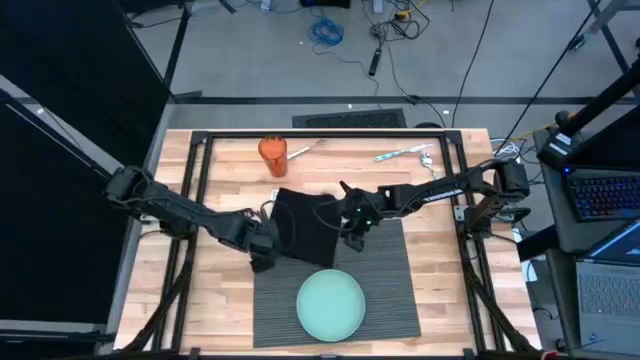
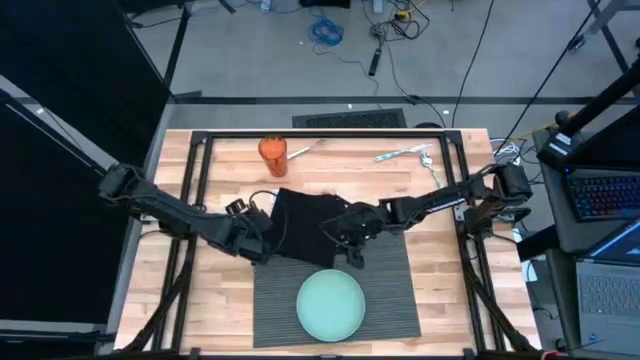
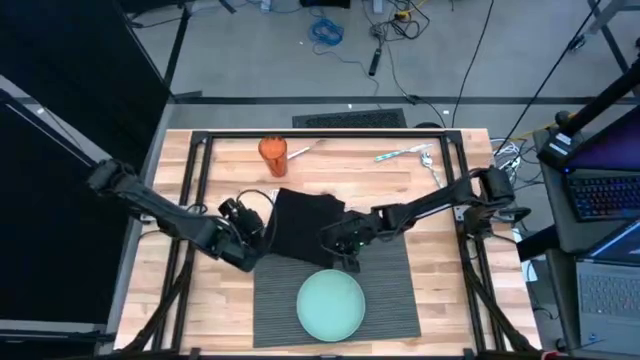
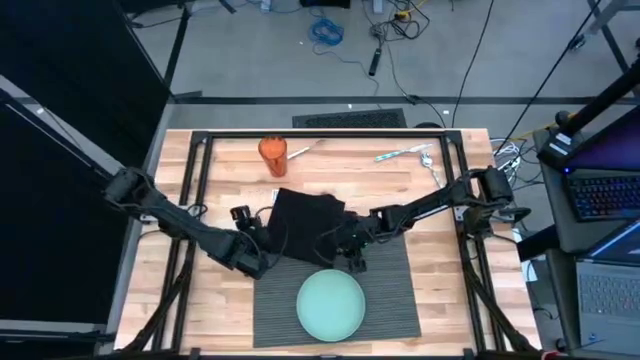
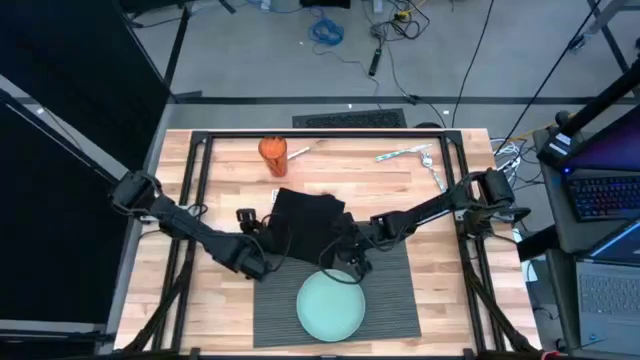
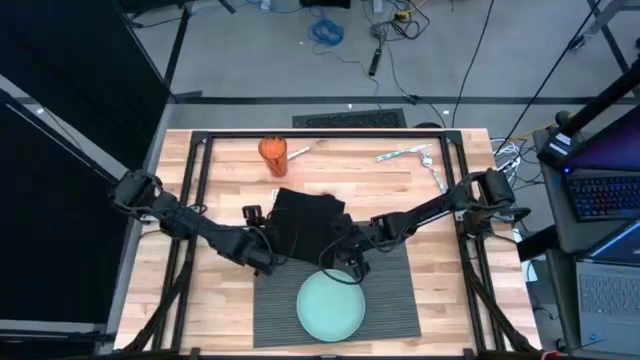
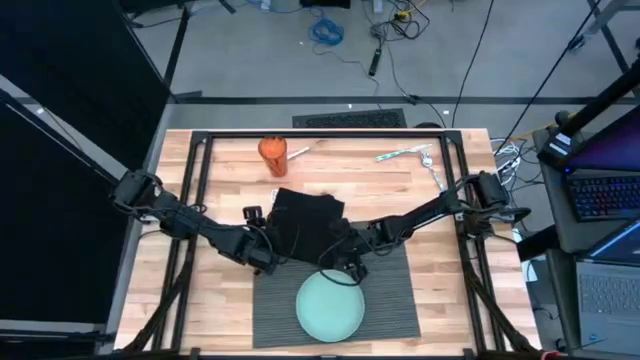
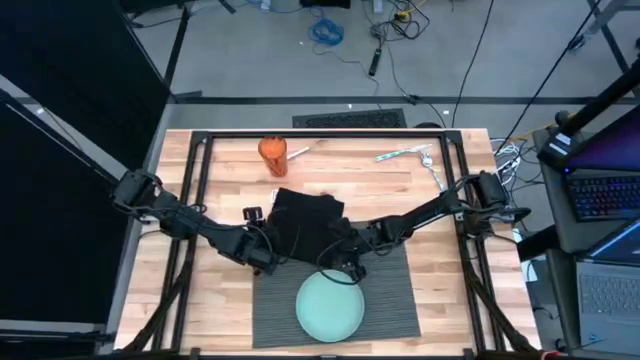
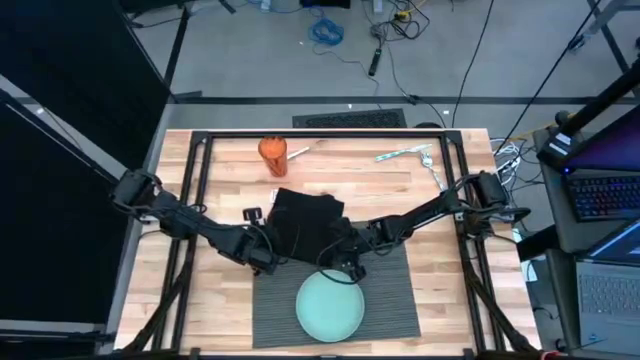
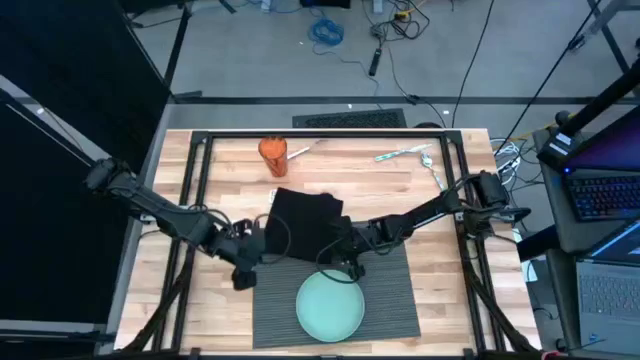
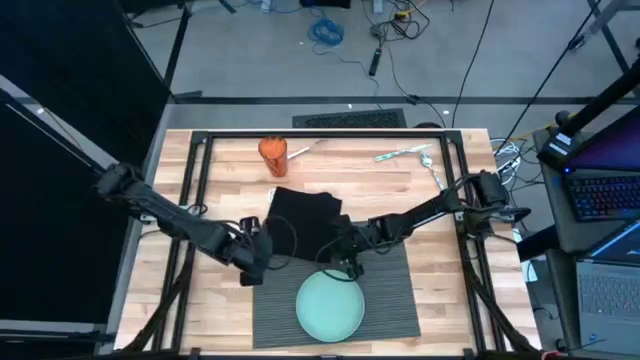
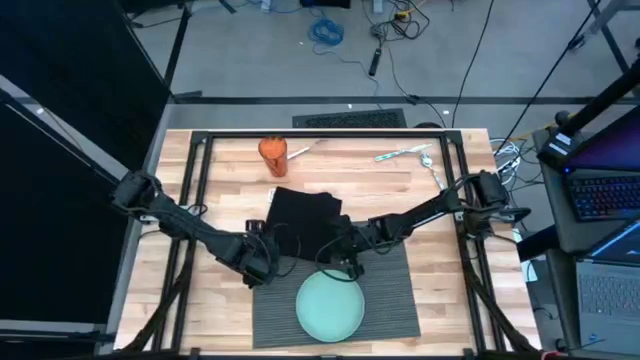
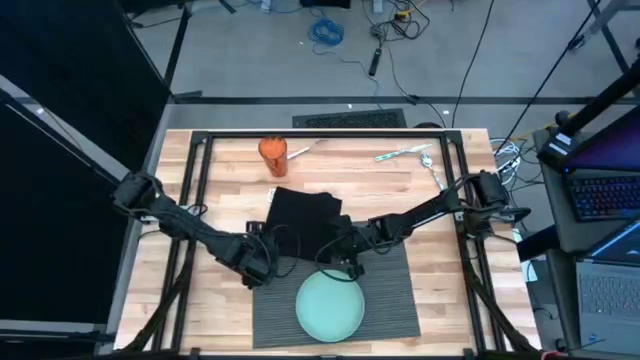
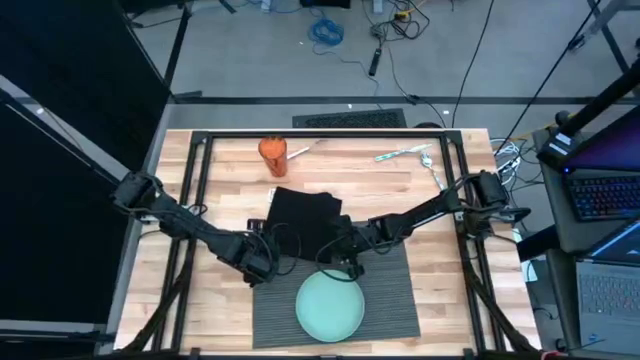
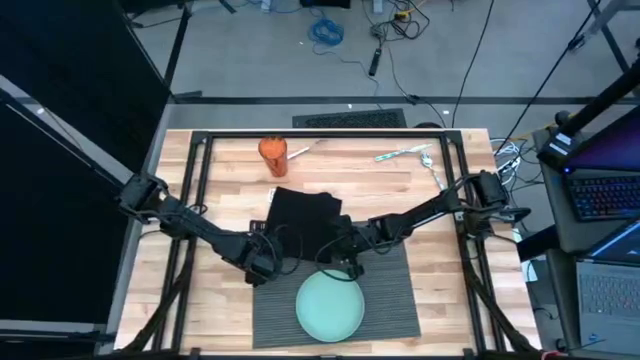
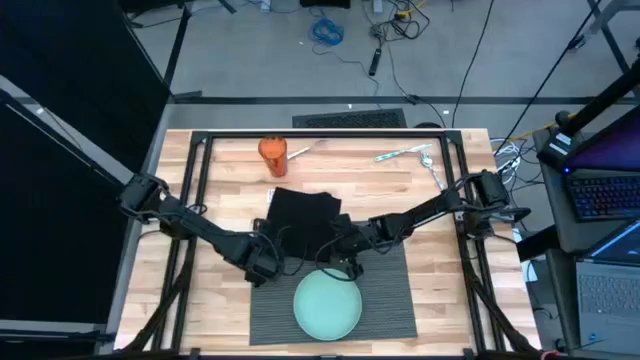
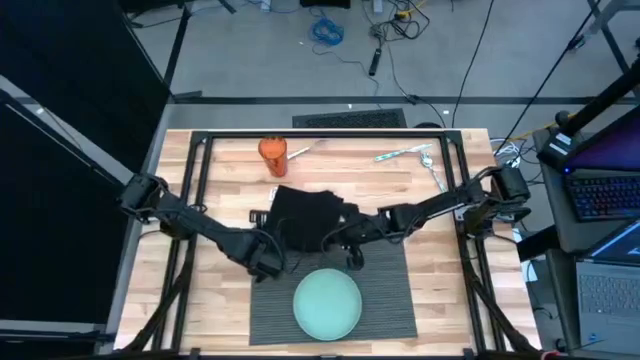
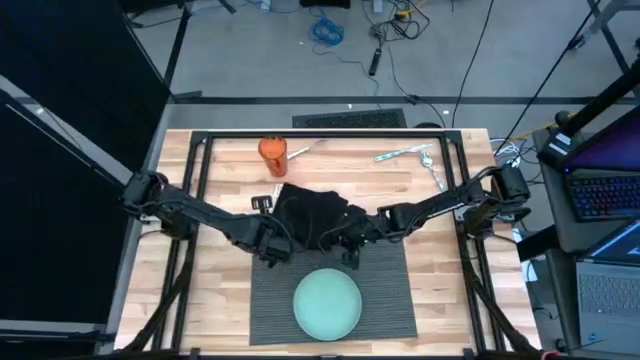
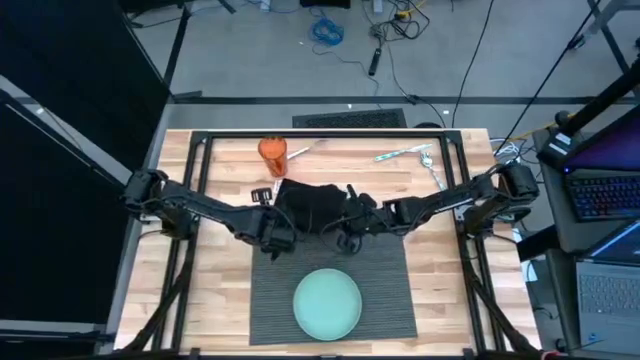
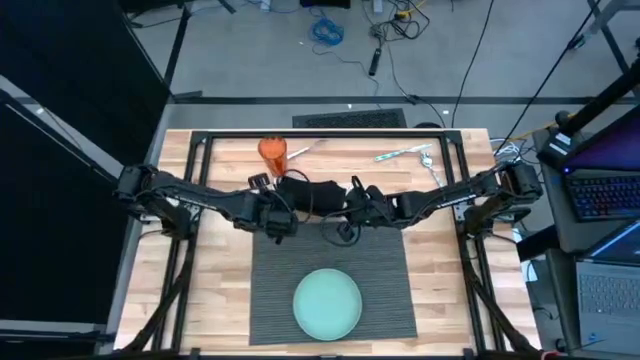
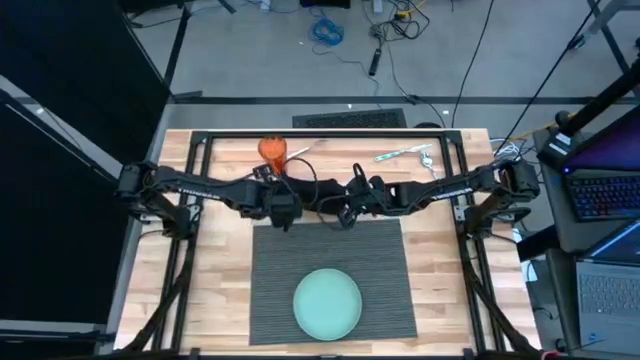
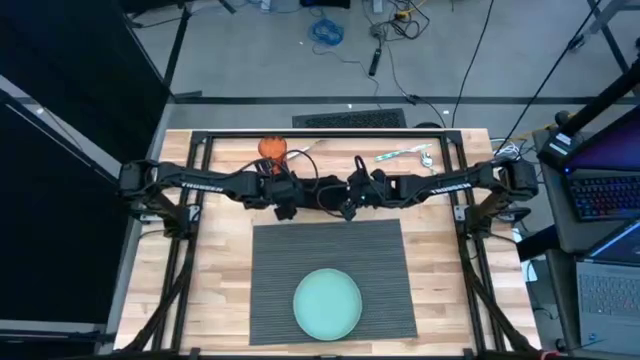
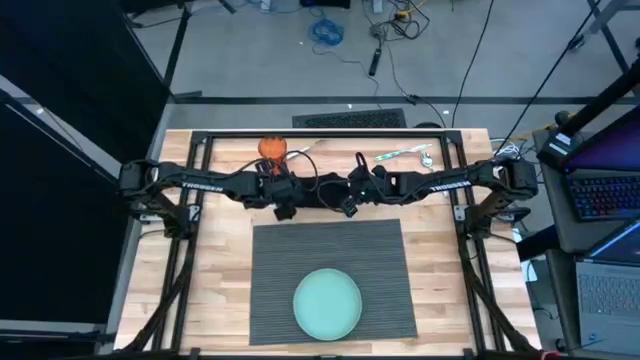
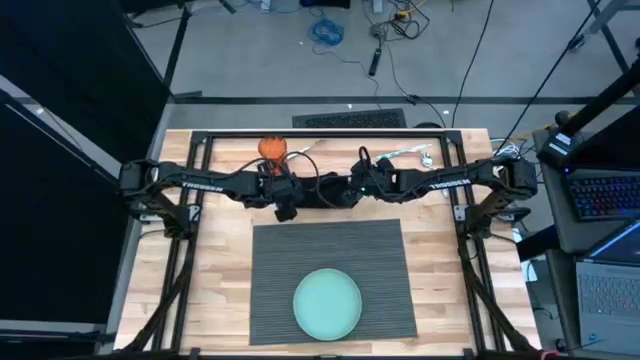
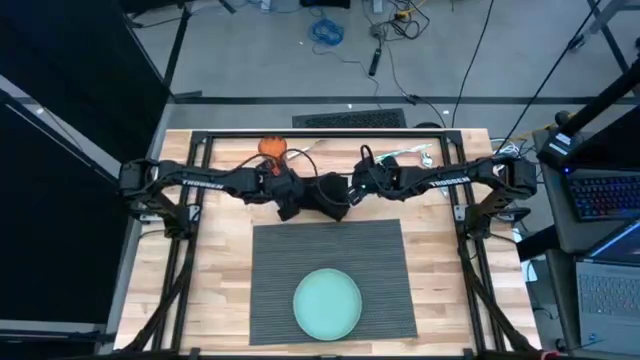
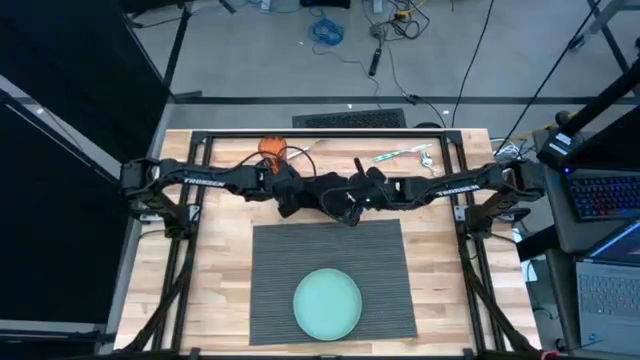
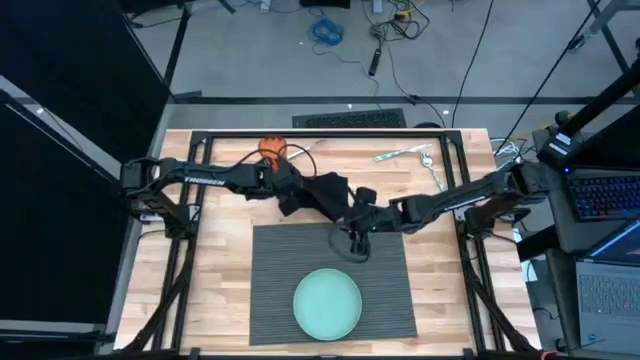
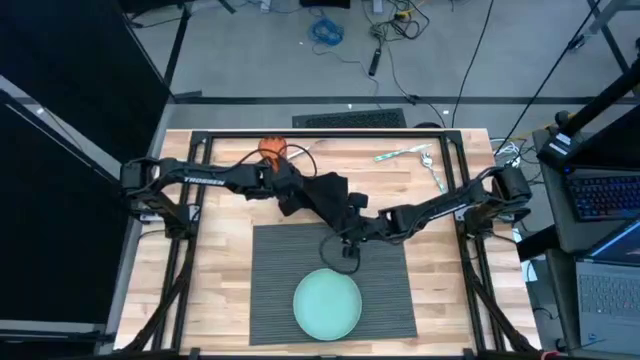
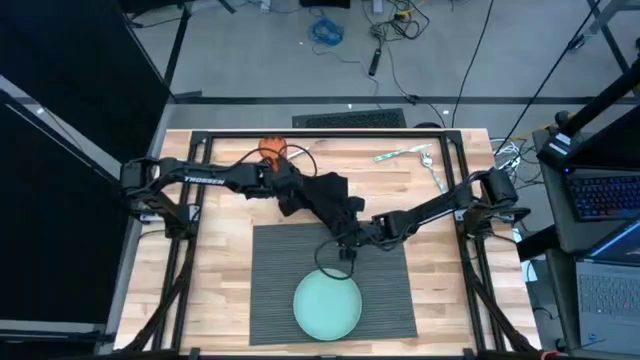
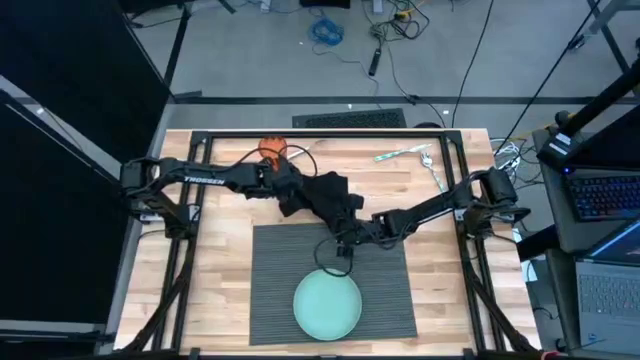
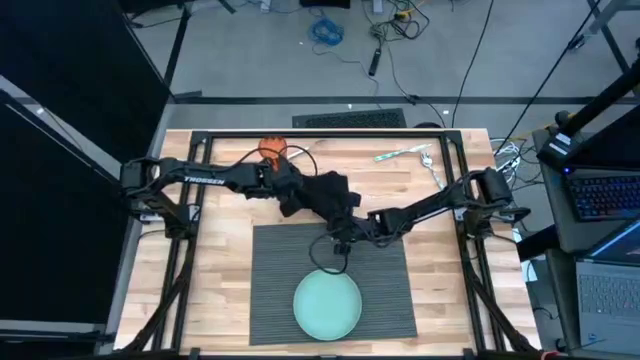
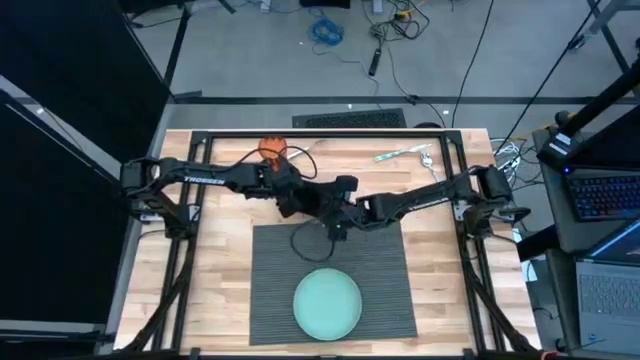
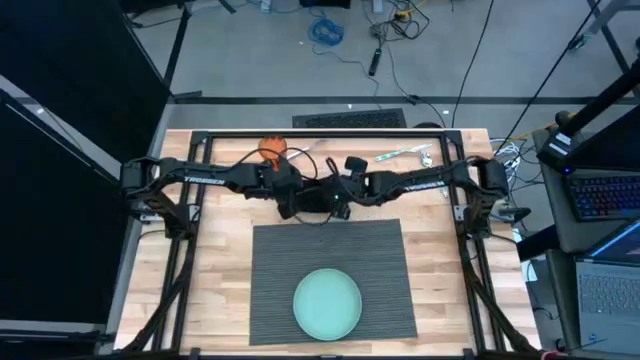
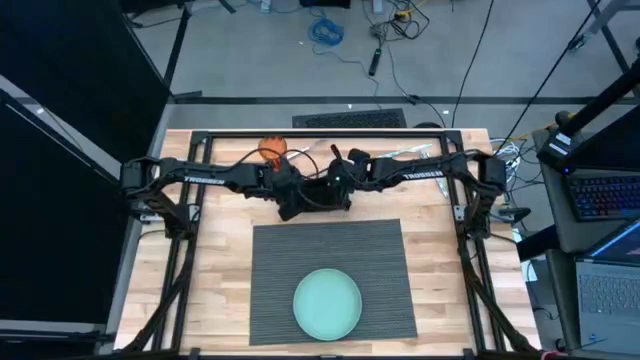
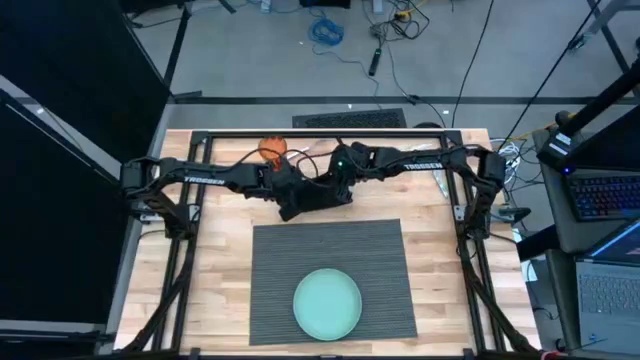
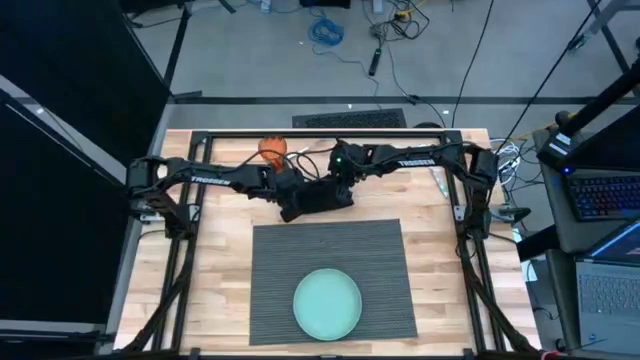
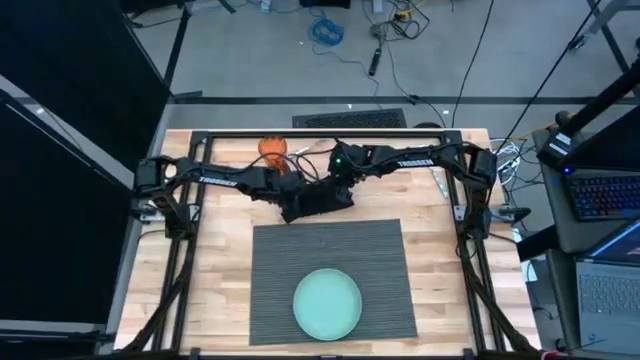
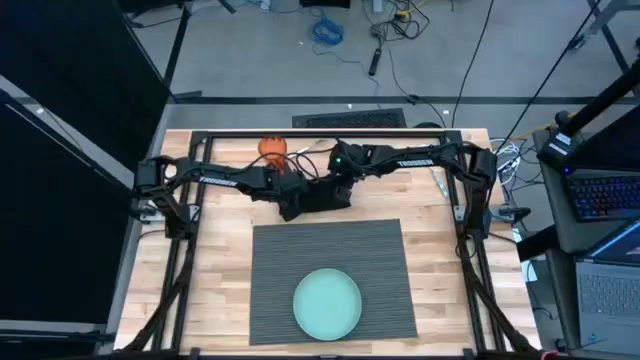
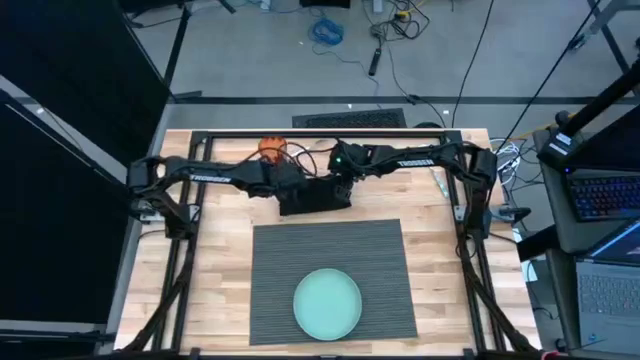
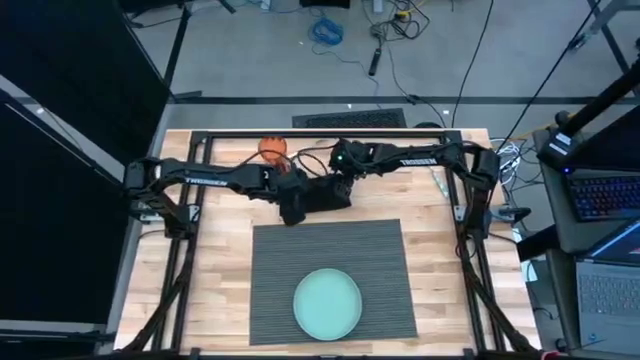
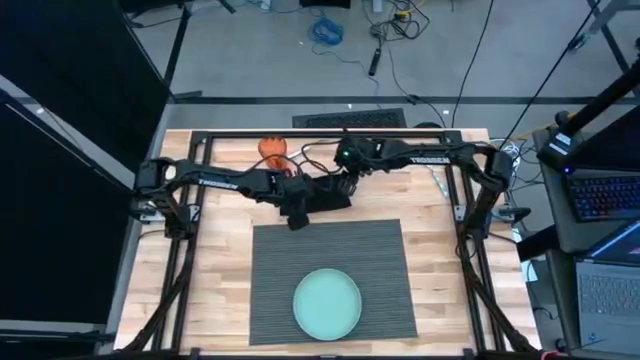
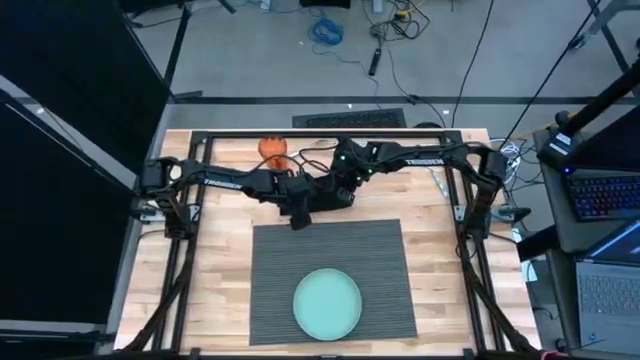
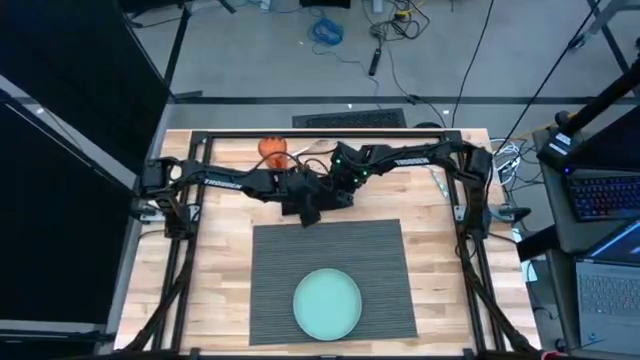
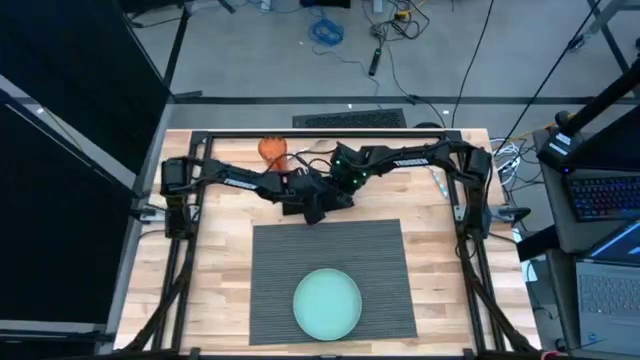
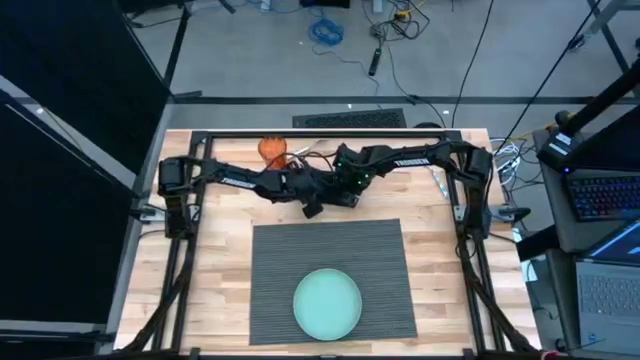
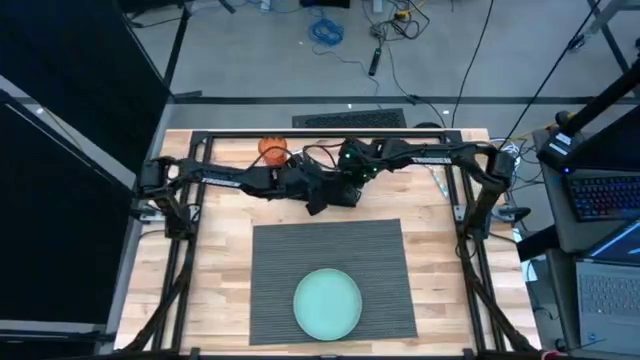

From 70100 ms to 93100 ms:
Task: Set table place
Fold the black napkin
